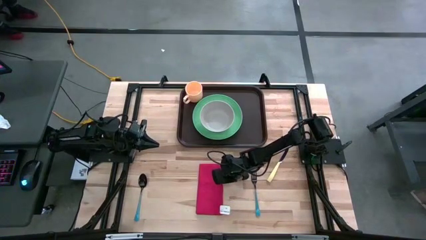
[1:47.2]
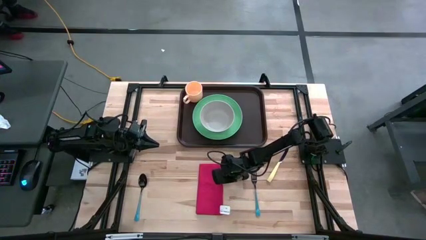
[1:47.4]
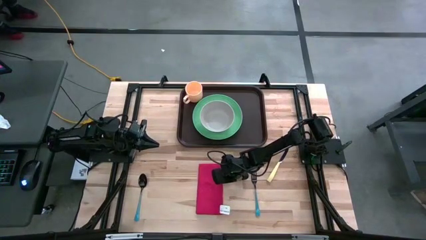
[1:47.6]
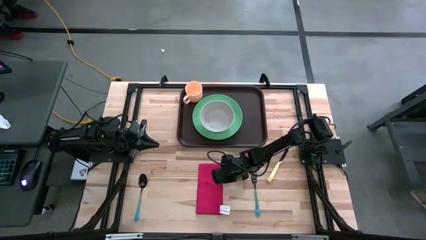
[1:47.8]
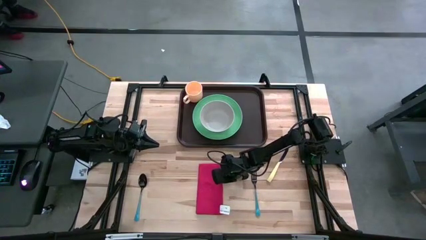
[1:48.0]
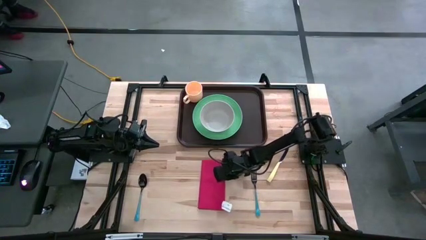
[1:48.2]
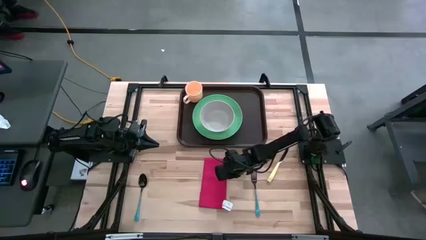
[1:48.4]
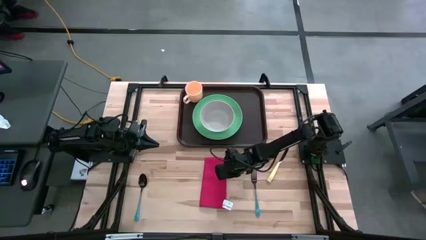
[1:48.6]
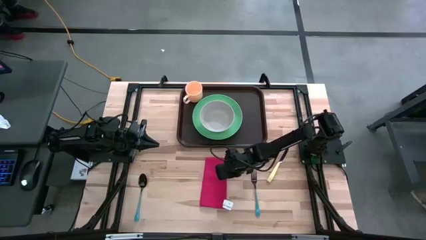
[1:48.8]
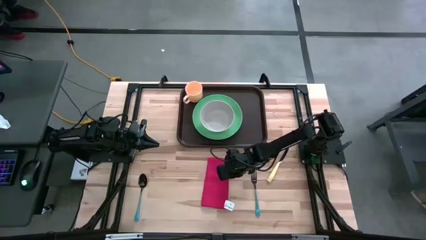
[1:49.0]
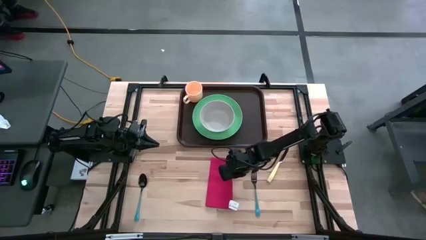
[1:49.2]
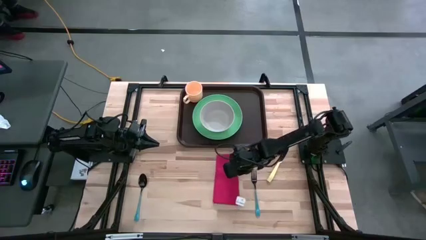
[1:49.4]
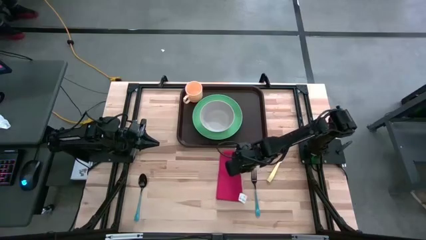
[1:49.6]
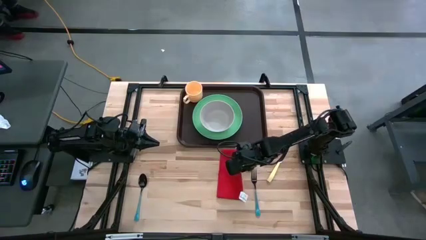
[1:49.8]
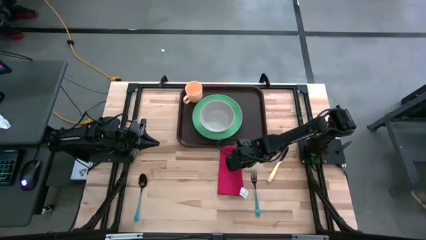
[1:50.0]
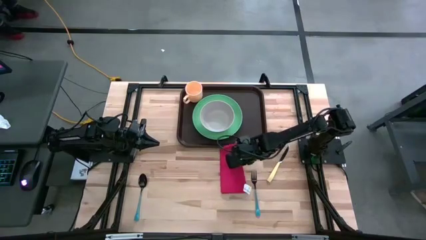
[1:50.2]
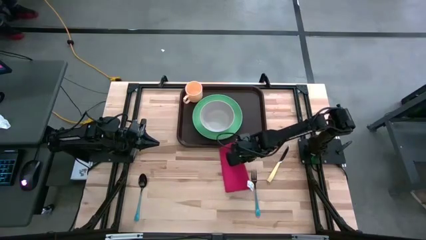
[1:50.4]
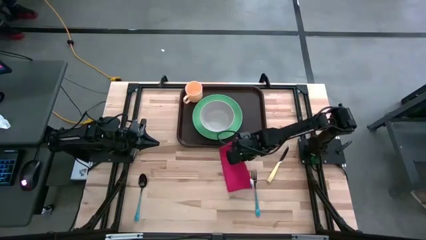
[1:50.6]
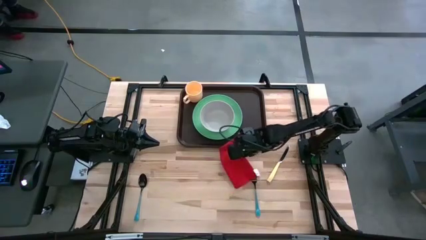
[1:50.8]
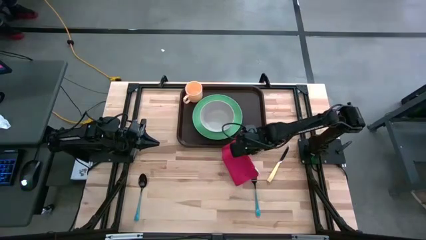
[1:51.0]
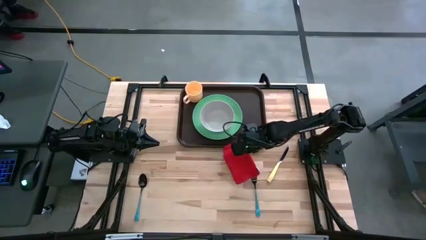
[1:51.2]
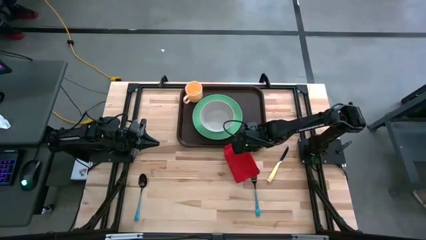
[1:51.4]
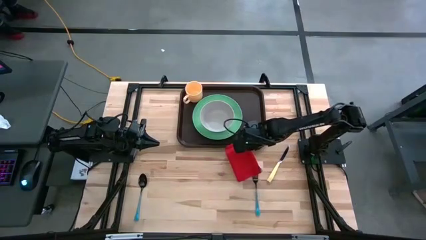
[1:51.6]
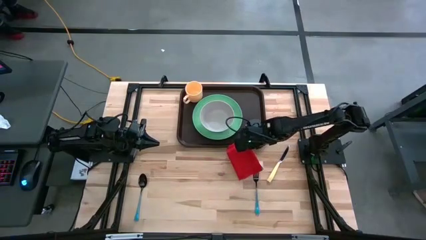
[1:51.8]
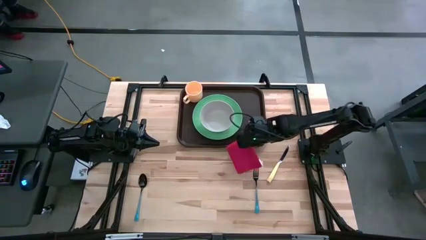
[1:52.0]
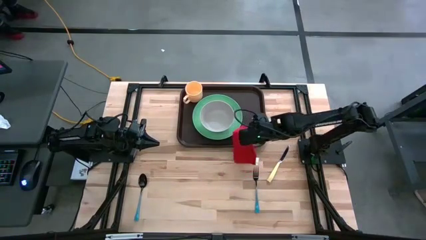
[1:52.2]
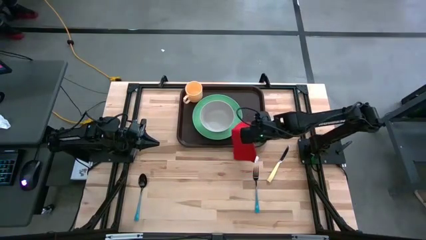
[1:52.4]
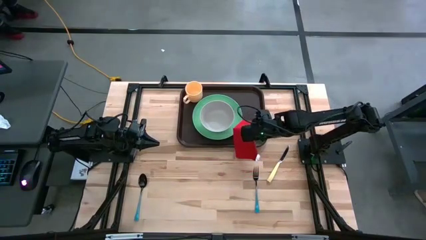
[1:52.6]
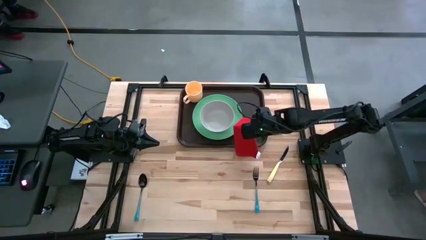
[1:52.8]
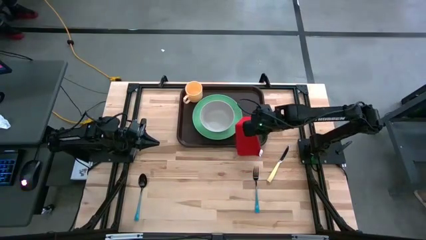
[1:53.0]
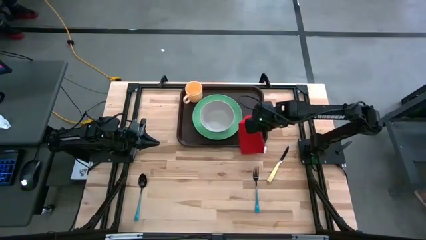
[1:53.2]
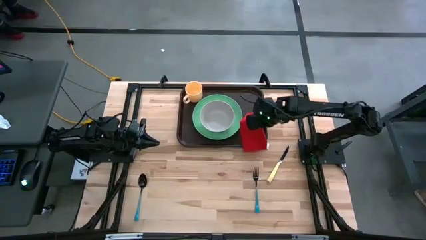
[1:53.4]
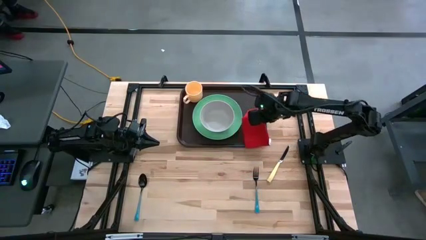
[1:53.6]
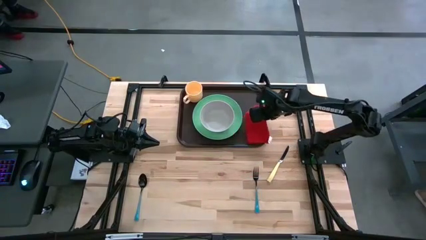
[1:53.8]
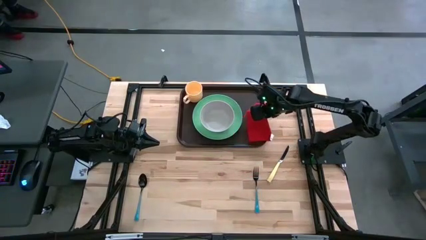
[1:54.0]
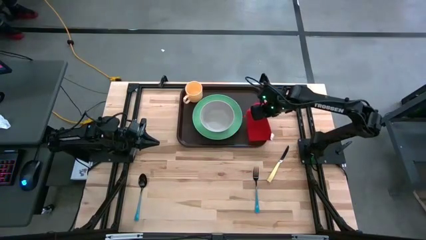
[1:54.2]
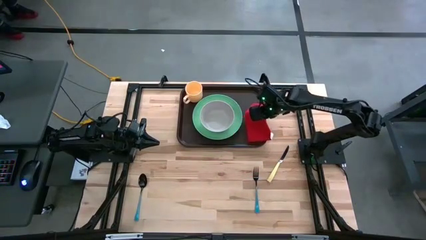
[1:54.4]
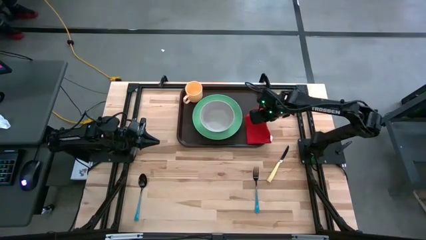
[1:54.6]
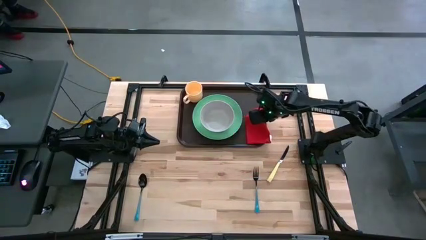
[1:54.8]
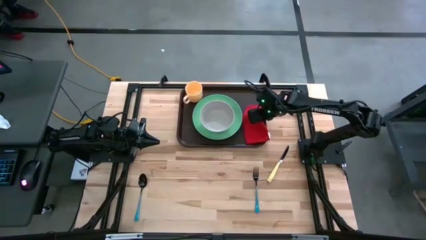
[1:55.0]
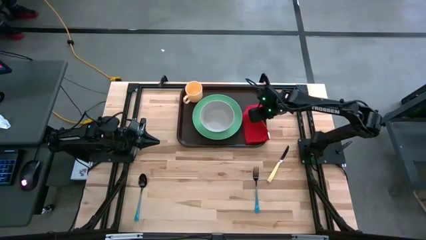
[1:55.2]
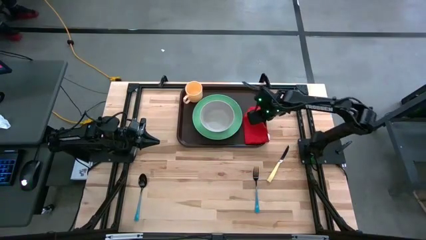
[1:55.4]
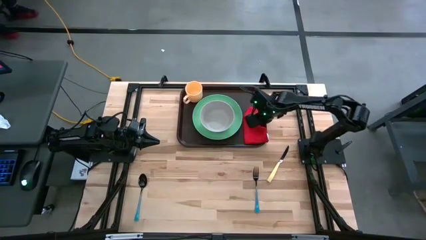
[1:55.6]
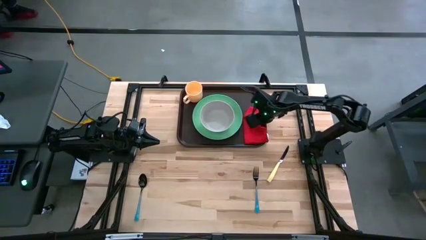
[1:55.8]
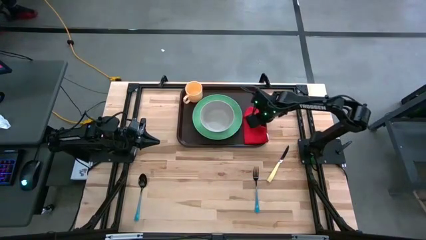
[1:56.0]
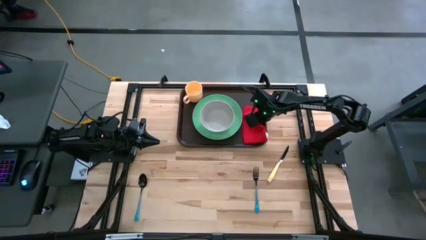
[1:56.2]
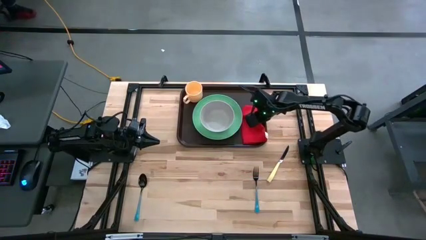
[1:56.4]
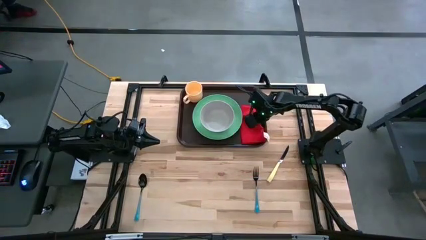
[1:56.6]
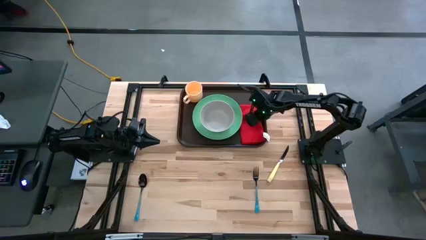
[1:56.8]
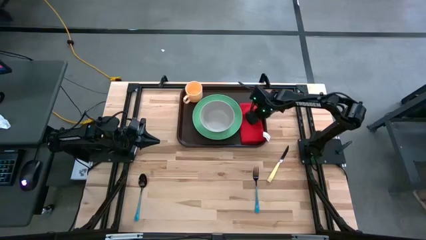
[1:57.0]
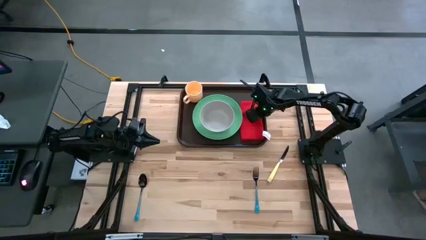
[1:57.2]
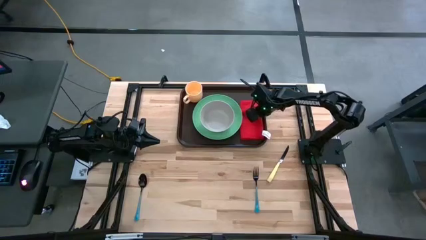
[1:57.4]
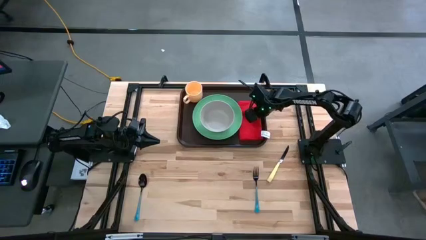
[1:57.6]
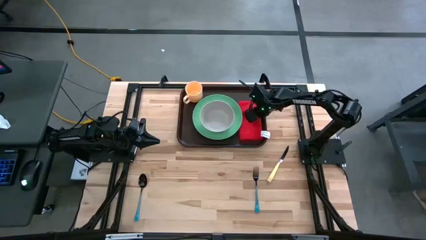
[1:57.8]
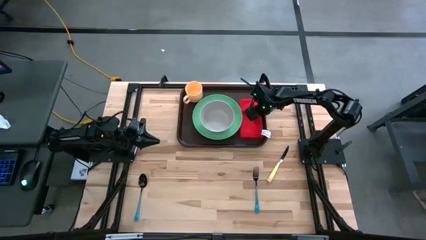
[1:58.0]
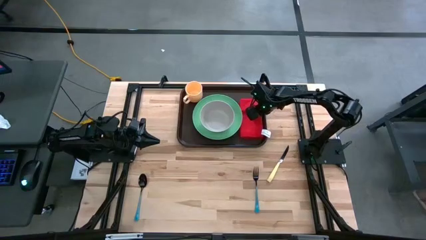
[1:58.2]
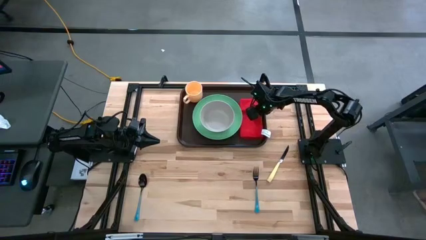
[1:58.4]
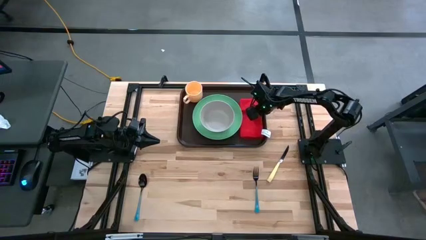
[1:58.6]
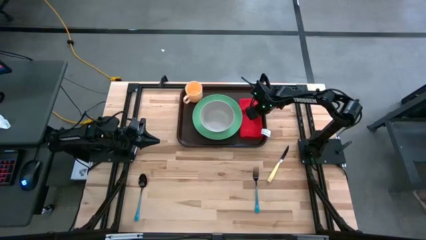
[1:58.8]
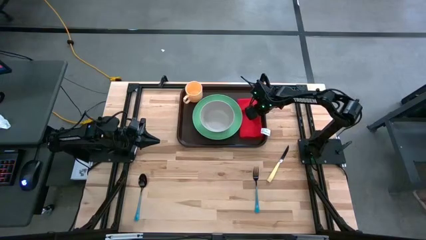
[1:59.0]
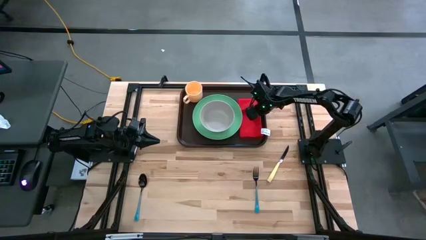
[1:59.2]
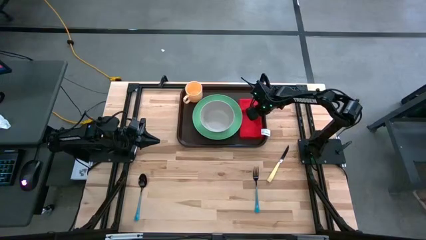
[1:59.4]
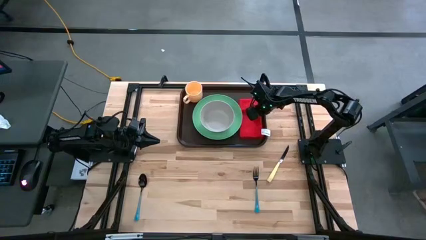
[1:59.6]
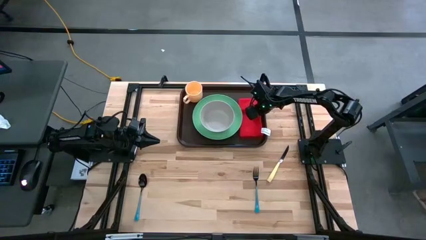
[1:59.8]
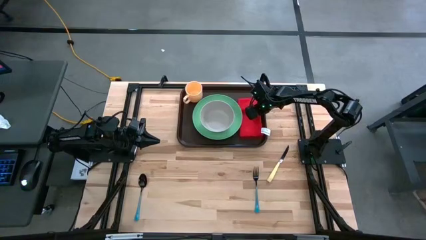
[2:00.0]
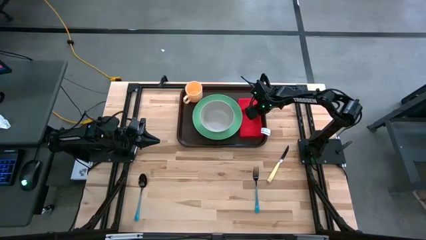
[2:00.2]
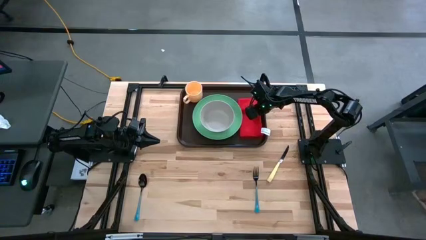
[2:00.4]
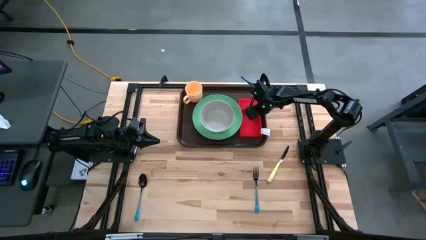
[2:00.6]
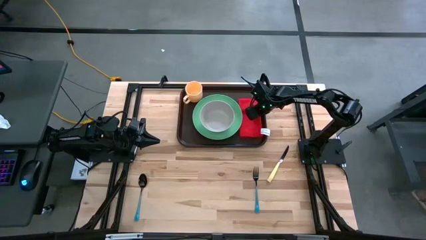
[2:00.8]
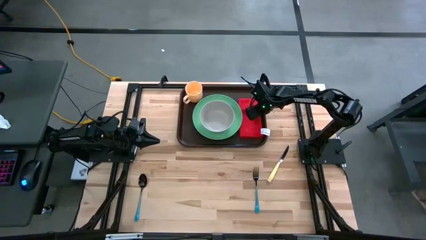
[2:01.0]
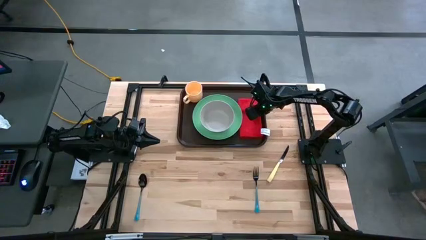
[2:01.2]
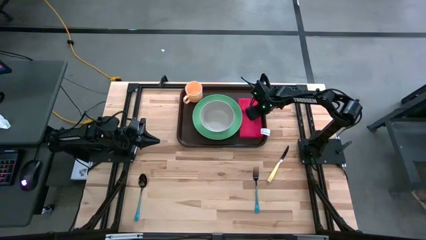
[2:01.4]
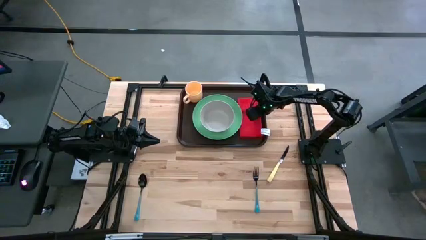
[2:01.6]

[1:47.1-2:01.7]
Task: Set up tray
Put the red table napkin on the brown tray to the right of the green plate

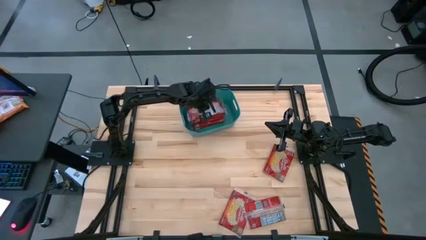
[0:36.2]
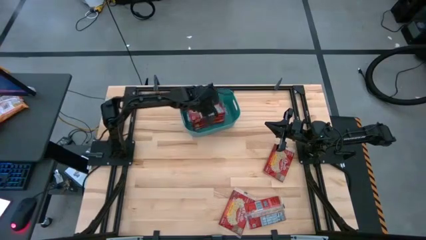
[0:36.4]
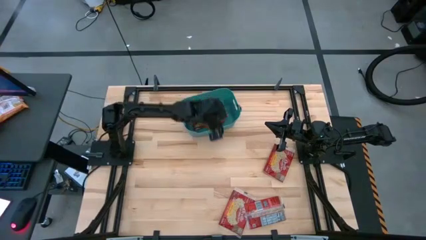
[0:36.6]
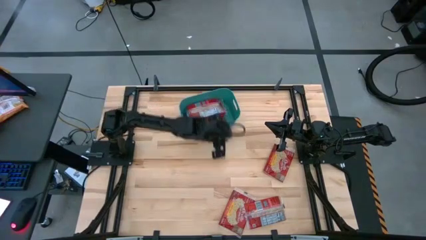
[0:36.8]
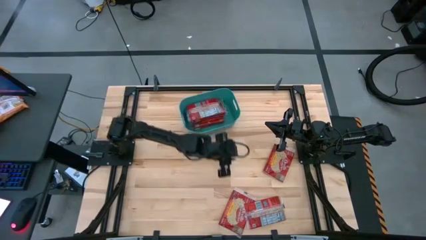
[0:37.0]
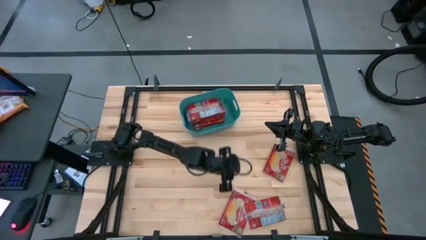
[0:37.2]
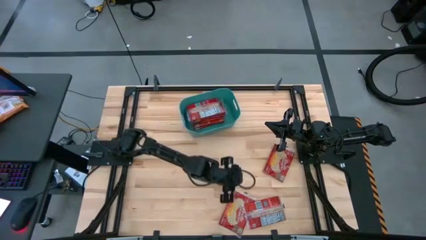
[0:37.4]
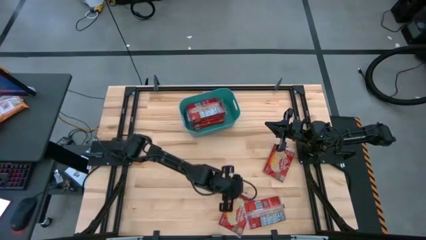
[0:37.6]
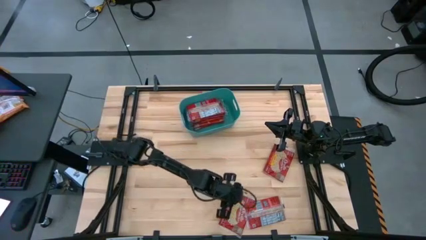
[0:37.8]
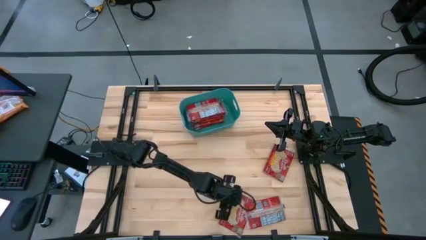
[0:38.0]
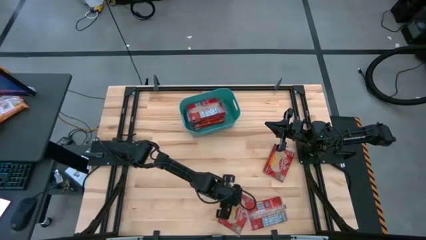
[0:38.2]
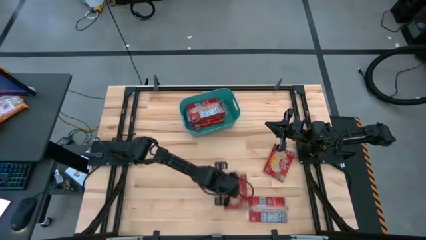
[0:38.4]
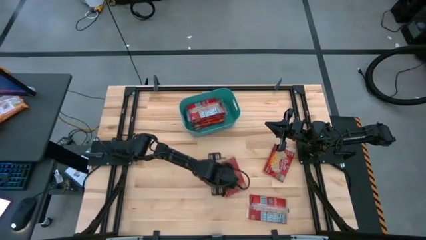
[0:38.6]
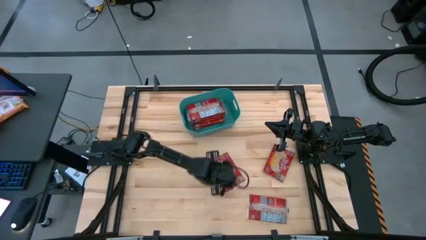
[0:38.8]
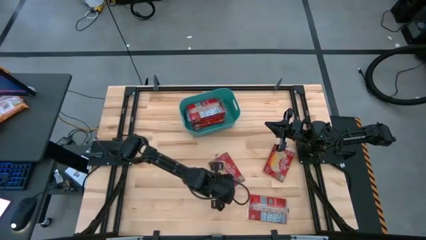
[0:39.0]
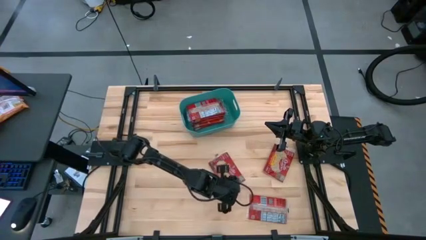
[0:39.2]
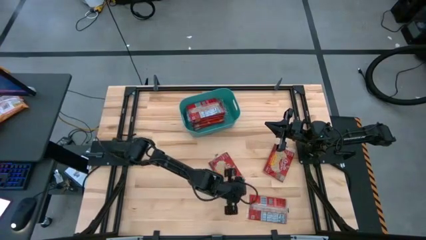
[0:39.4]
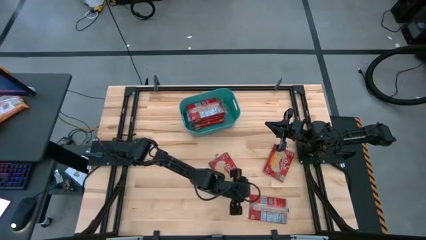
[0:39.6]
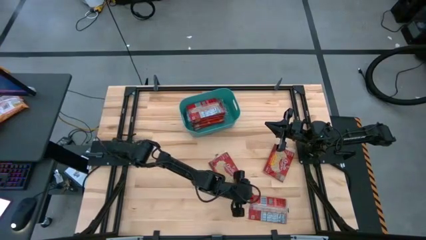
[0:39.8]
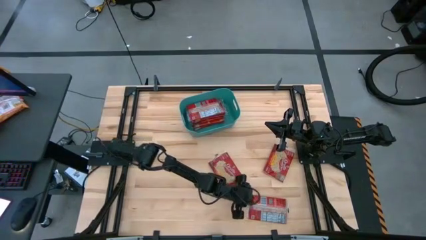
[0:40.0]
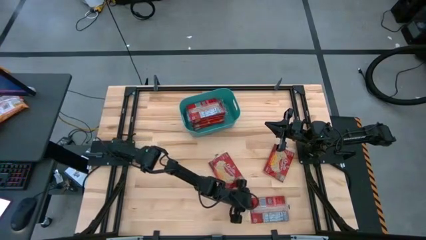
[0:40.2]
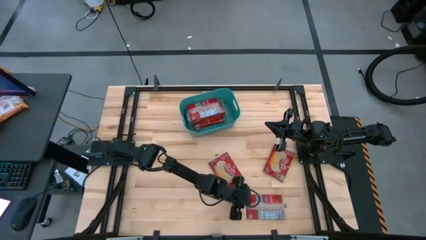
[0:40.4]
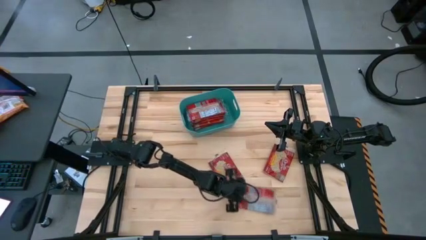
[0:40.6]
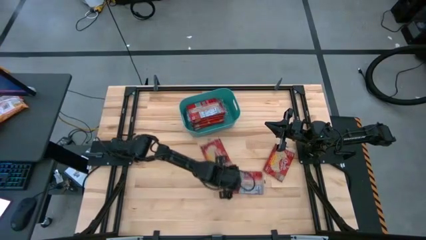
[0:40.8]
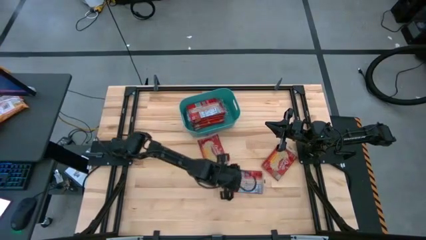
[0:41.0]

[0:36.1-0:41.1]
Task: Sort popcorn bags into baskets
Adjust the red popcorn bags
